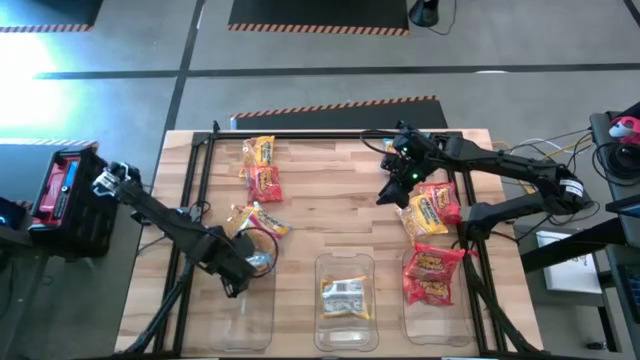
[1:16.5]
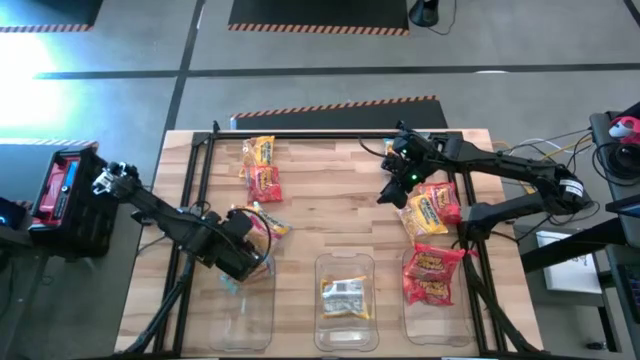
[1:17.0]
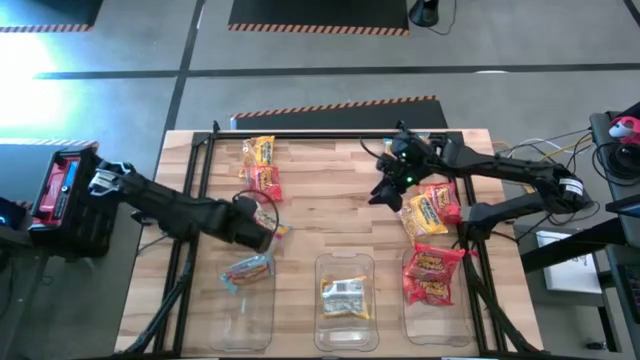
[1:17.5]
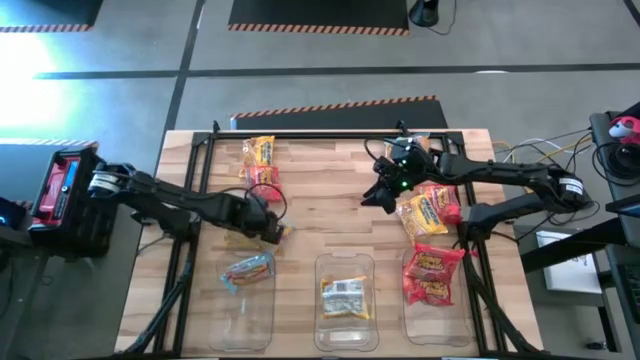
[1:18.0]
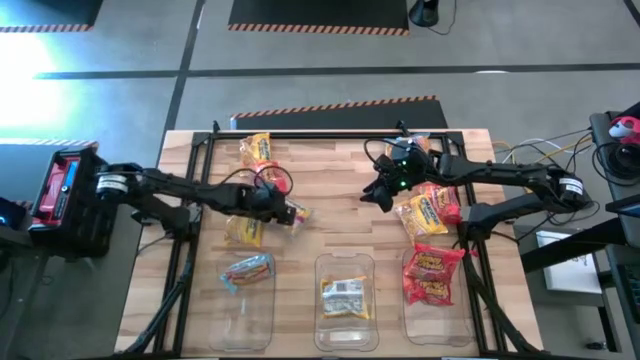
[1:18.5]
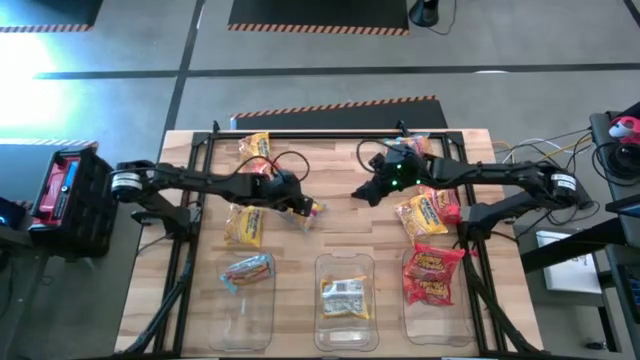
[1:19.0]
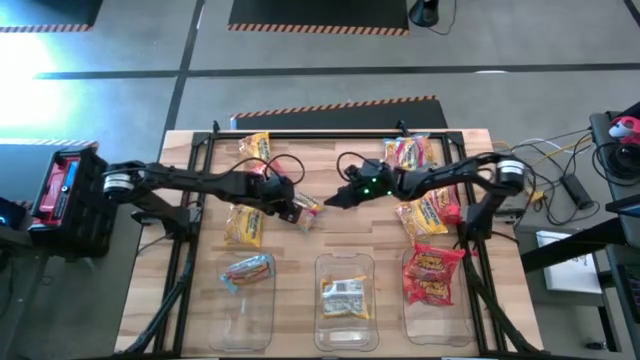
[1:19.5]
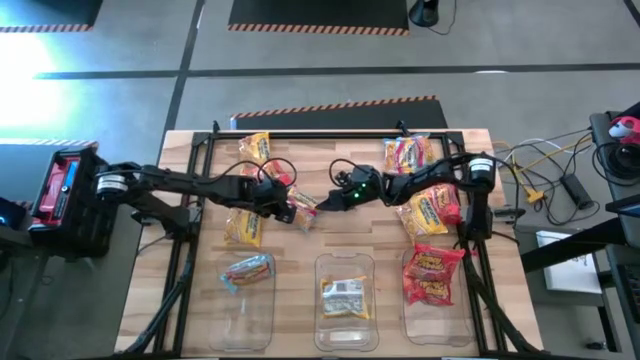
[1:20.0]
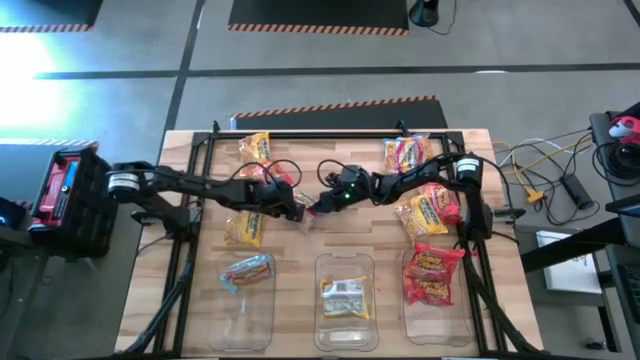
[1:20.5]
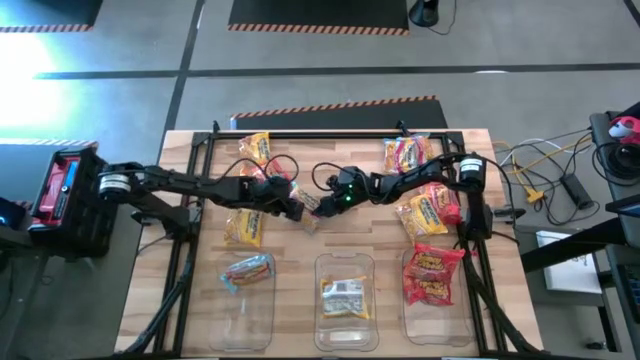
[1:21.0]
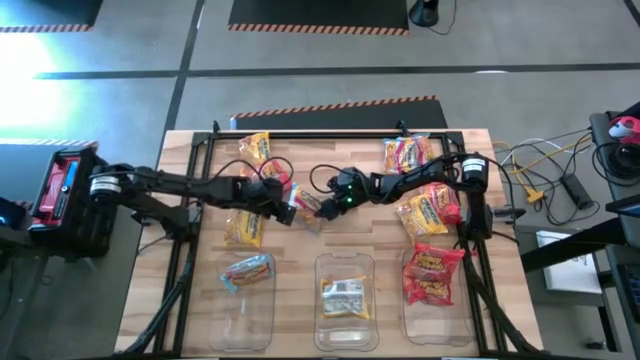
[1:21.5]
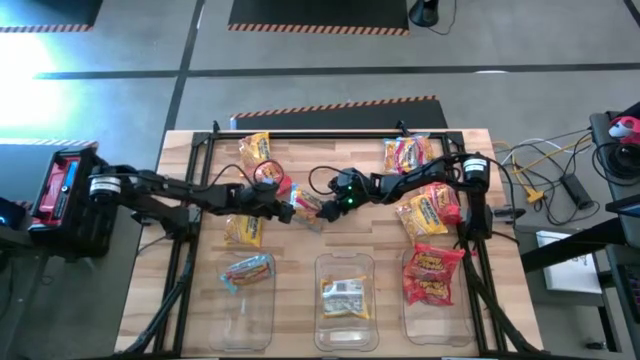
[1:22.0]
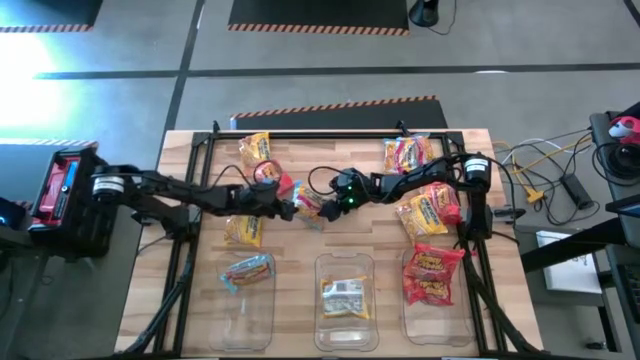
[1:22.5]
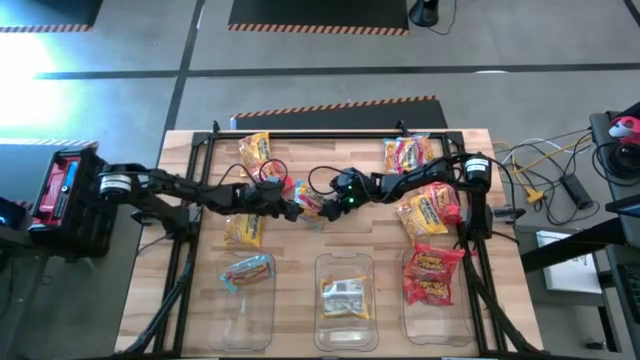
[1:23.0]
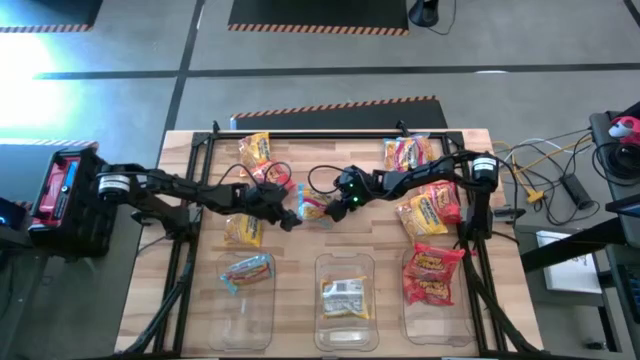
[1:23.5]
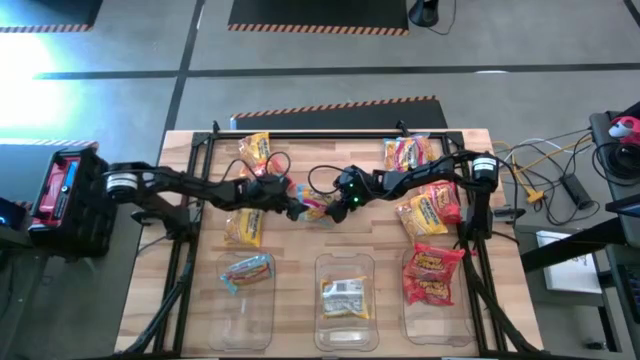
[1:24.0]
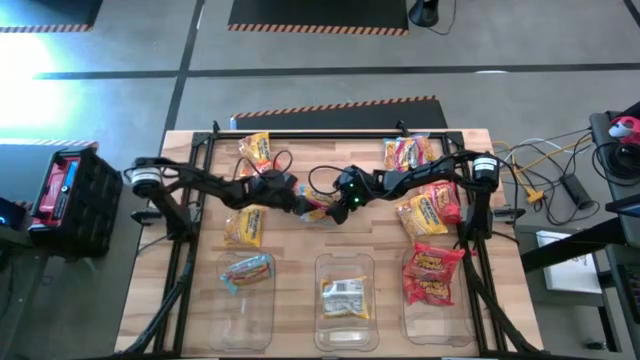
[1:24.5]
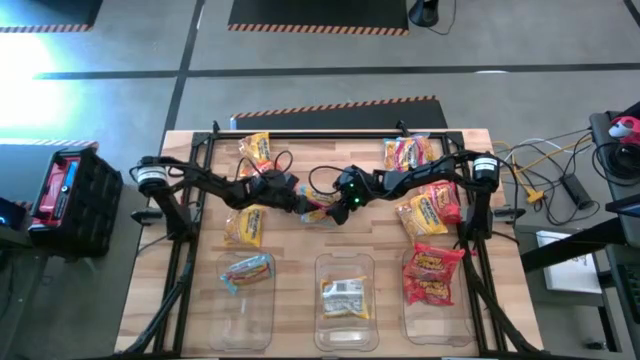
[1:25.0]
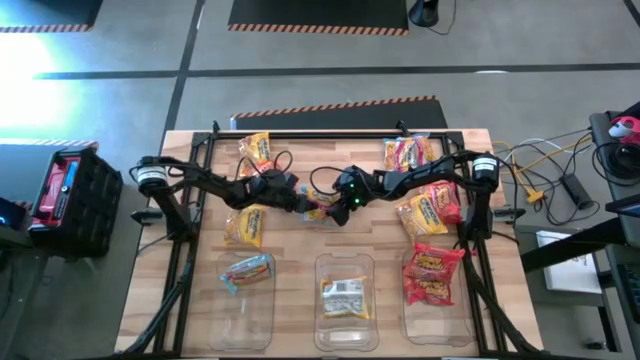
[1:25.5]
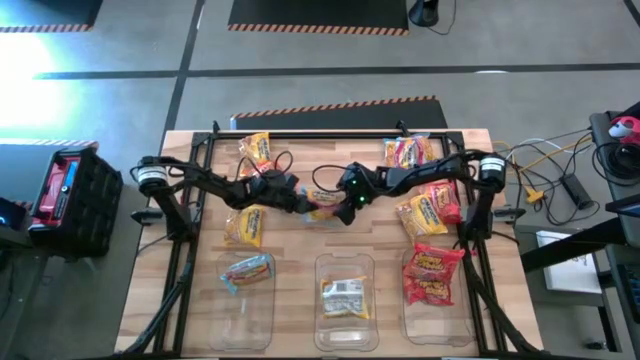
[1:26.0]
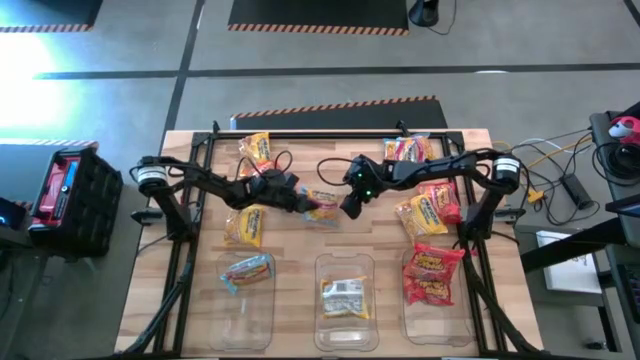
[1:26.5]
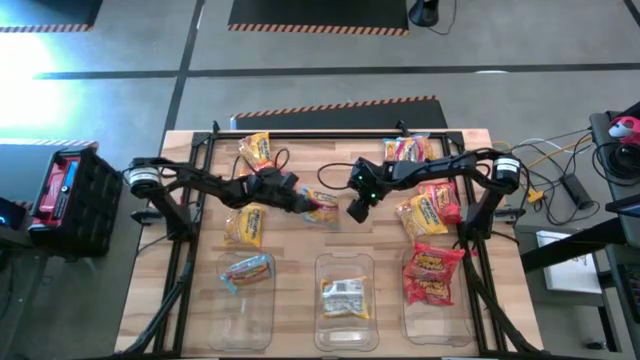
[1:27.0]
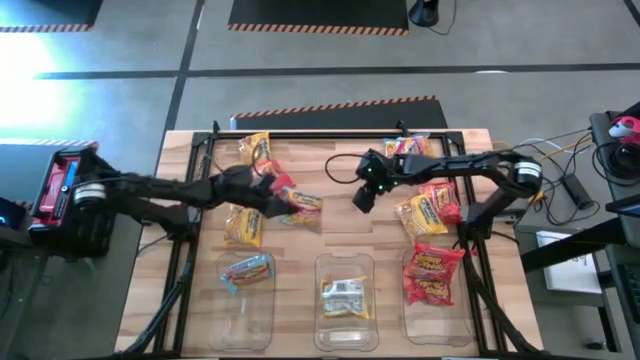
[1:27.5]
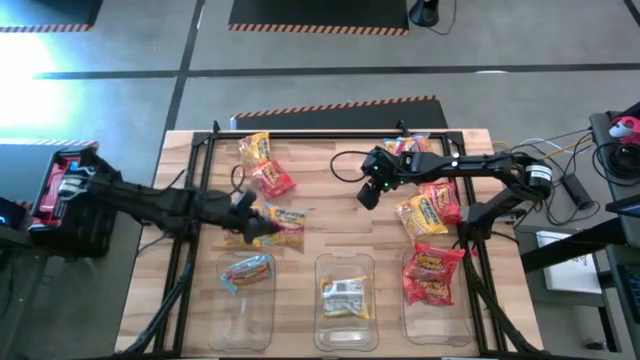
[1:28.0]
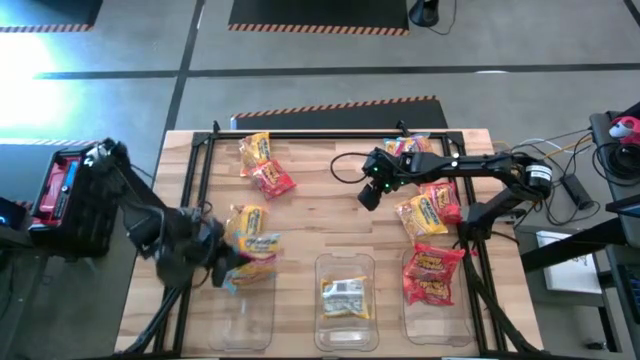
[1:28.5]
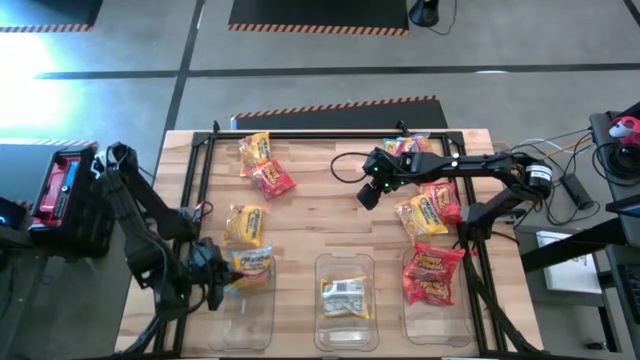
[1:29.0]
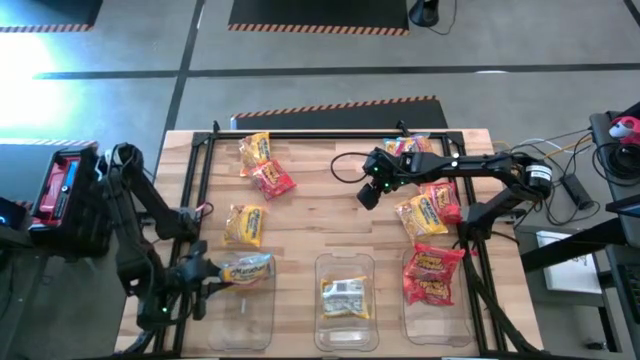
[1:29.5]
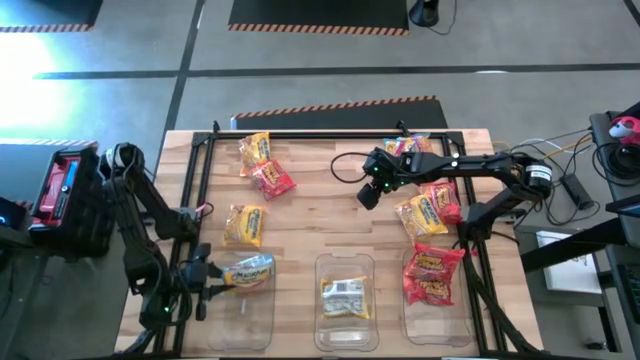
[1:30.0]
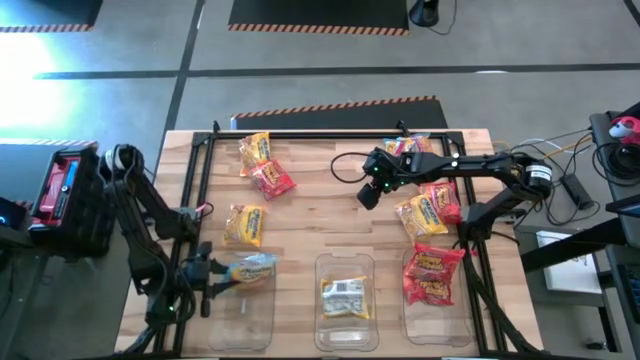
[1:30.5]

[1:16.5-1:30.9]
Task: Sort Maruchan noodles
Put the blue noodle pack into the left transparent bin
